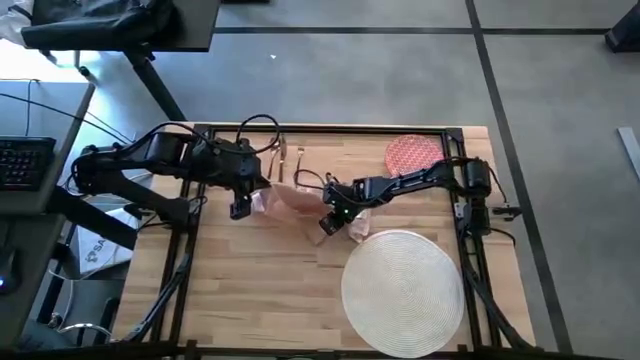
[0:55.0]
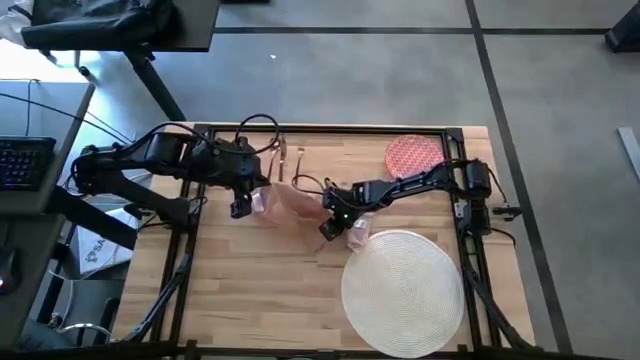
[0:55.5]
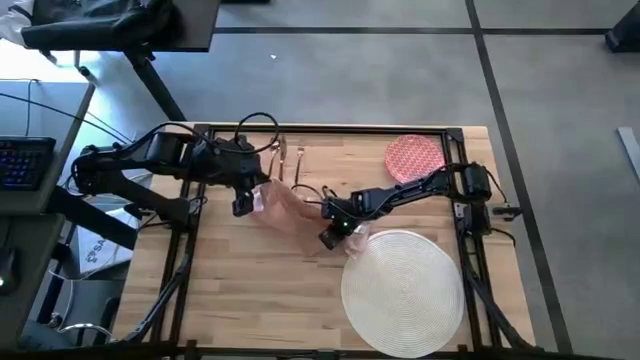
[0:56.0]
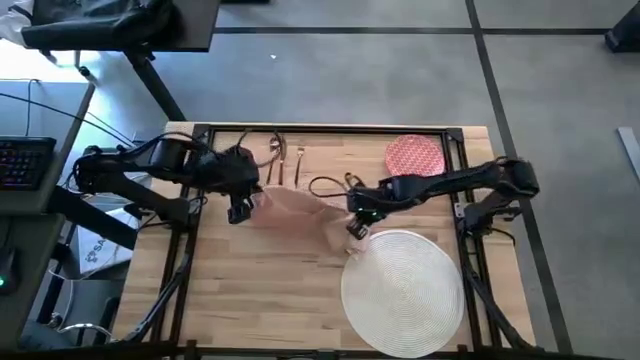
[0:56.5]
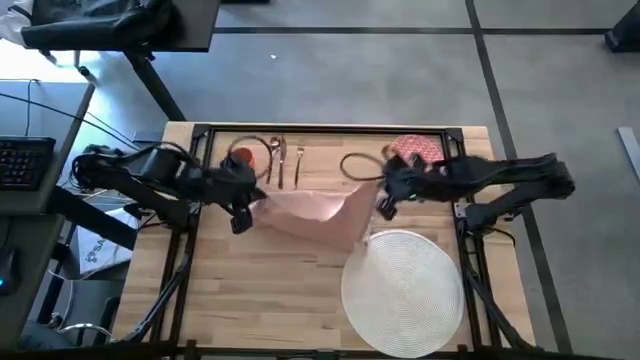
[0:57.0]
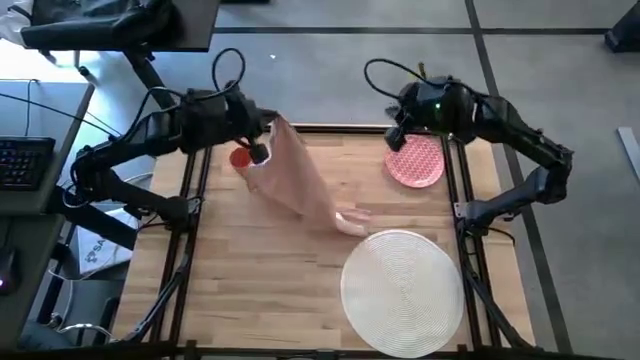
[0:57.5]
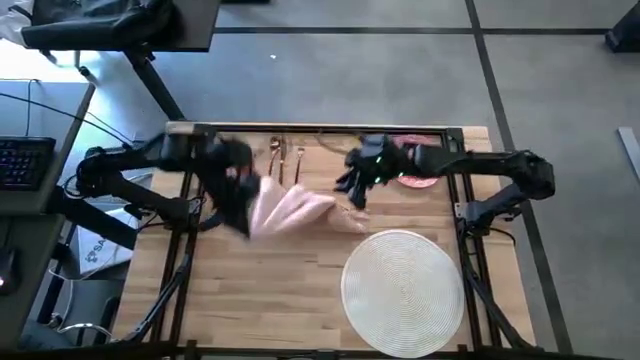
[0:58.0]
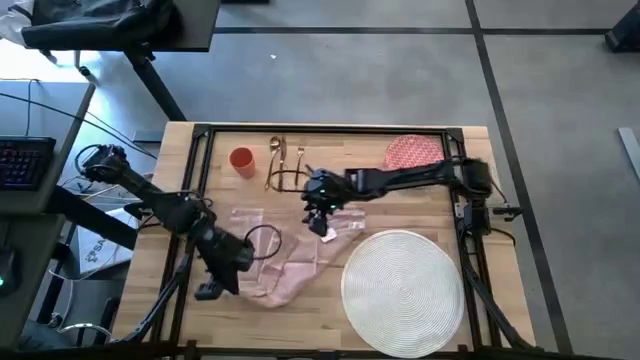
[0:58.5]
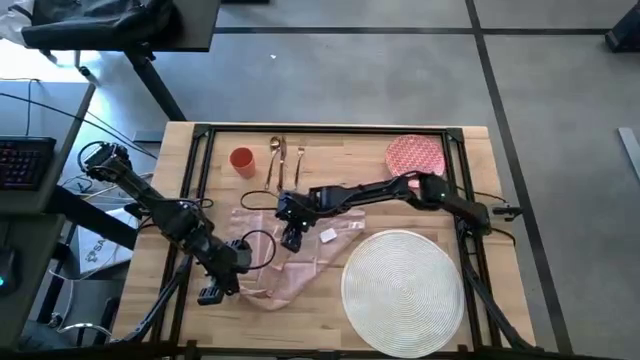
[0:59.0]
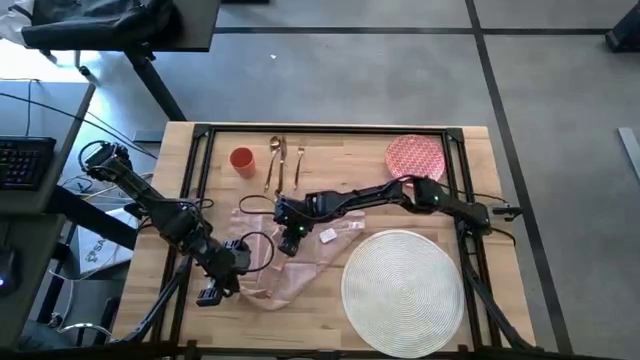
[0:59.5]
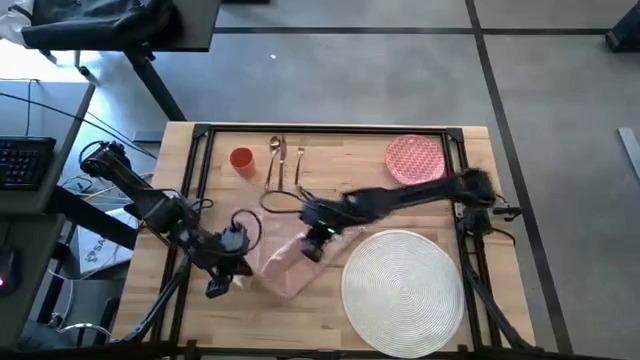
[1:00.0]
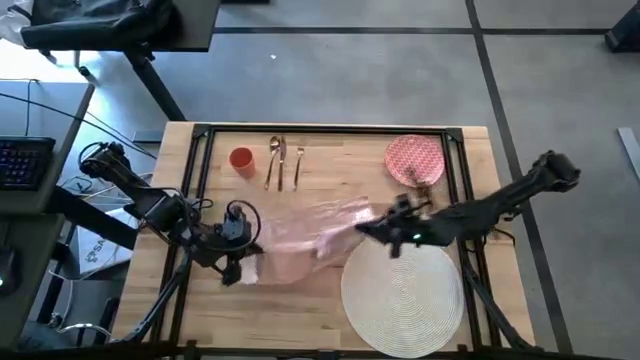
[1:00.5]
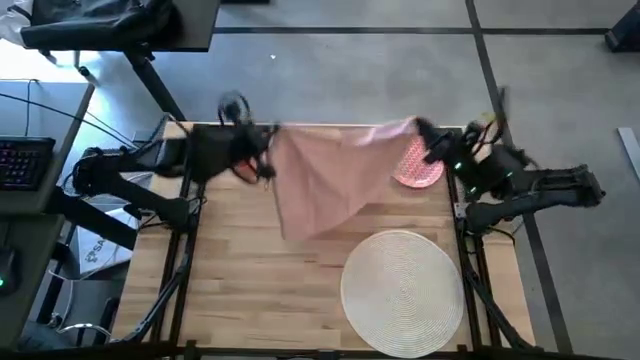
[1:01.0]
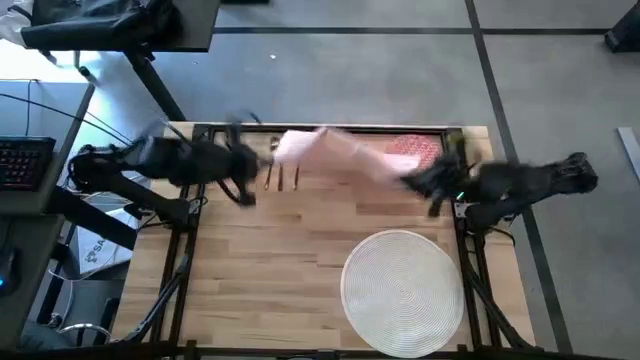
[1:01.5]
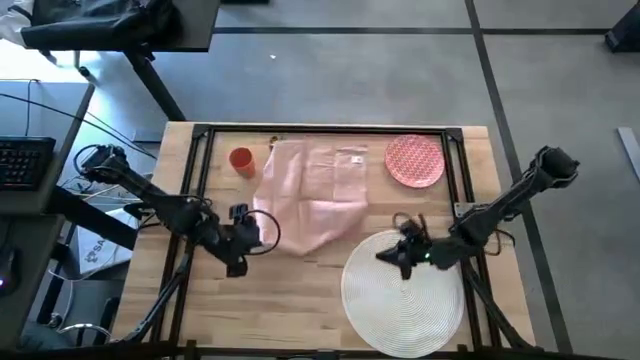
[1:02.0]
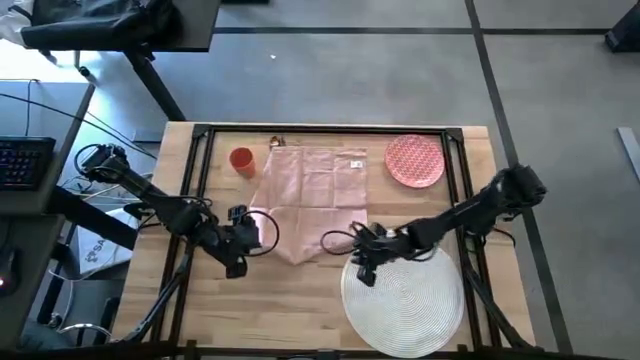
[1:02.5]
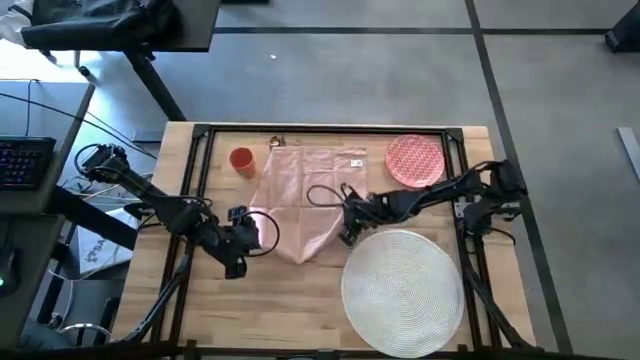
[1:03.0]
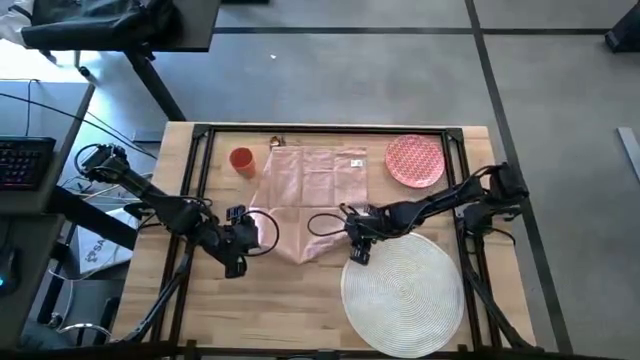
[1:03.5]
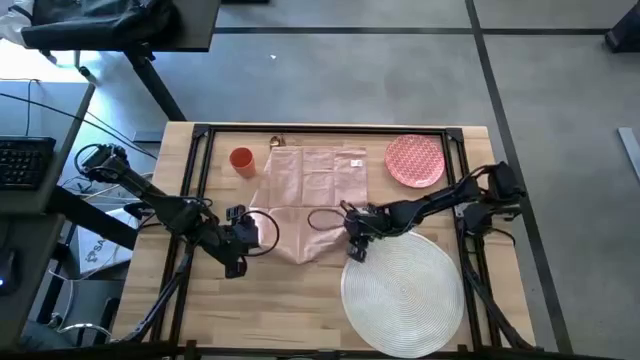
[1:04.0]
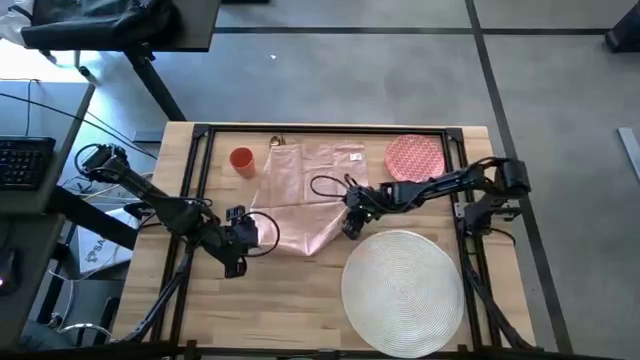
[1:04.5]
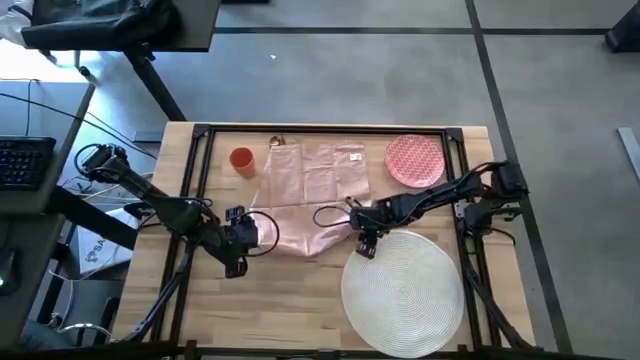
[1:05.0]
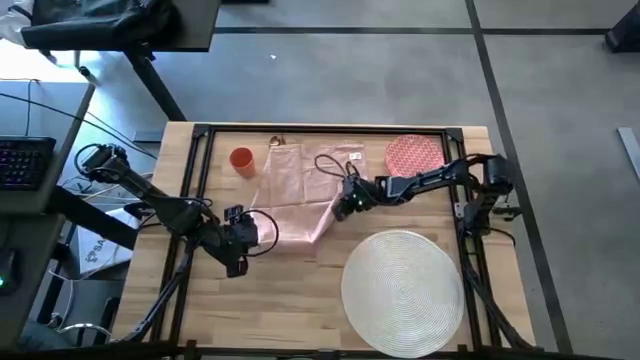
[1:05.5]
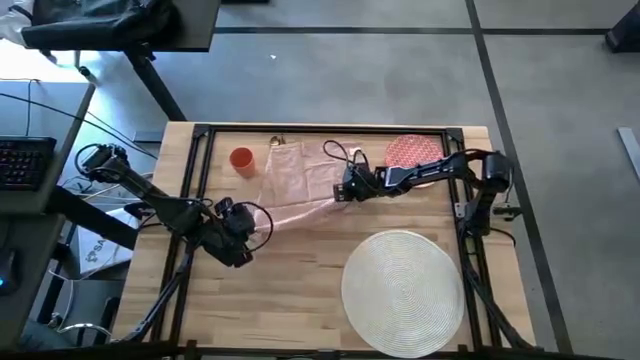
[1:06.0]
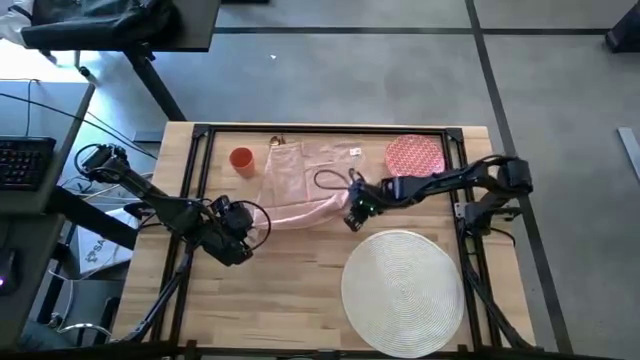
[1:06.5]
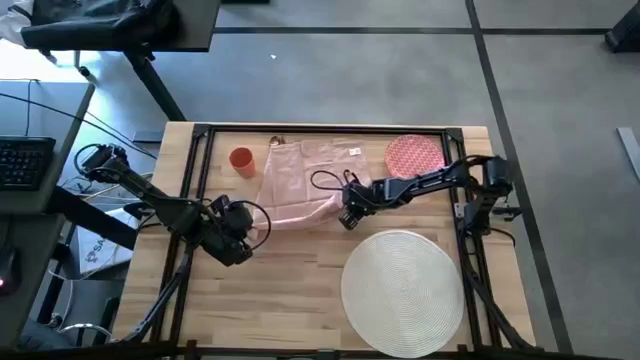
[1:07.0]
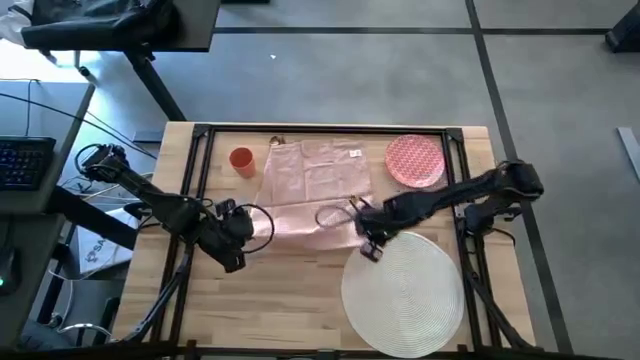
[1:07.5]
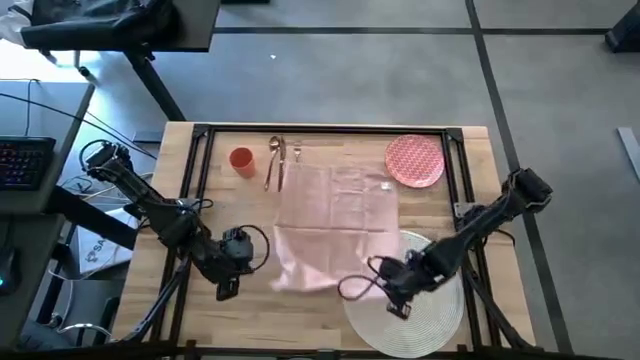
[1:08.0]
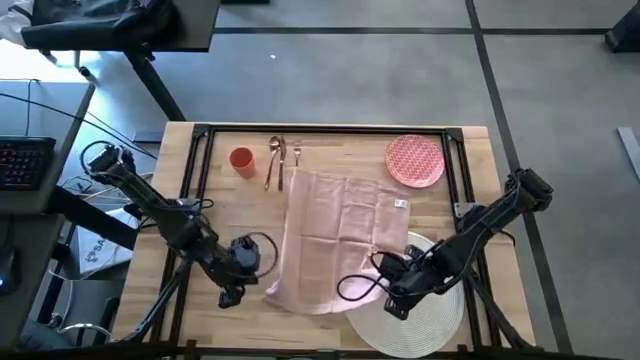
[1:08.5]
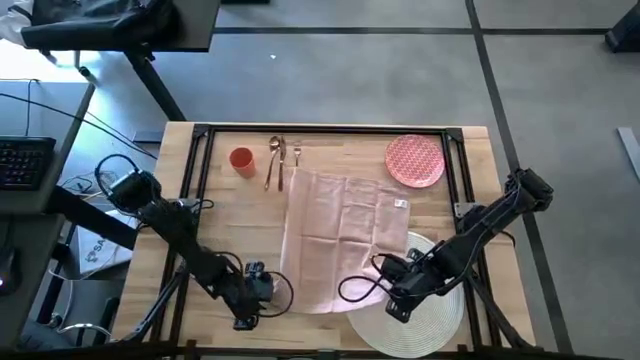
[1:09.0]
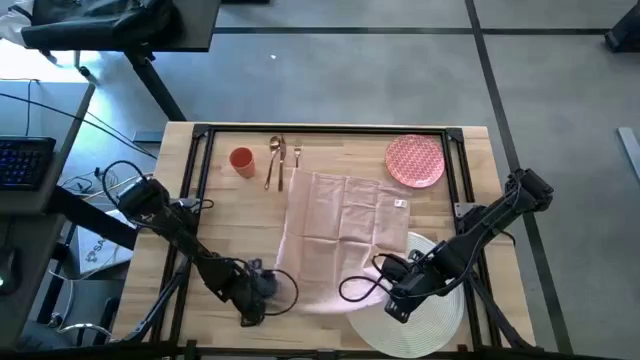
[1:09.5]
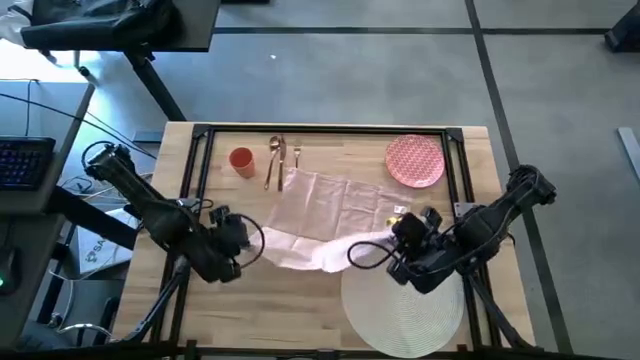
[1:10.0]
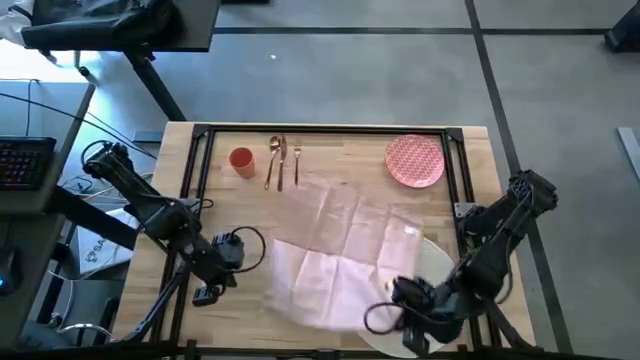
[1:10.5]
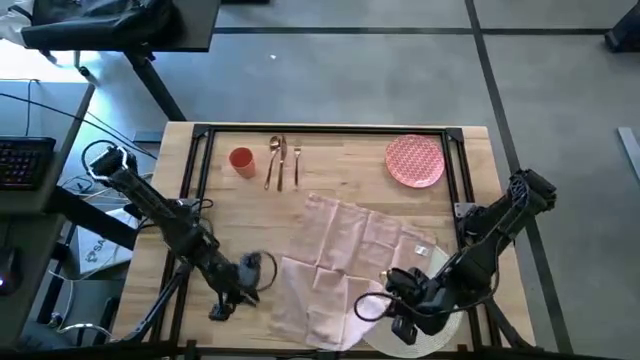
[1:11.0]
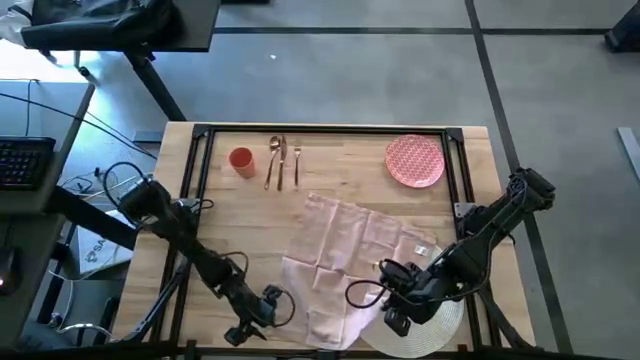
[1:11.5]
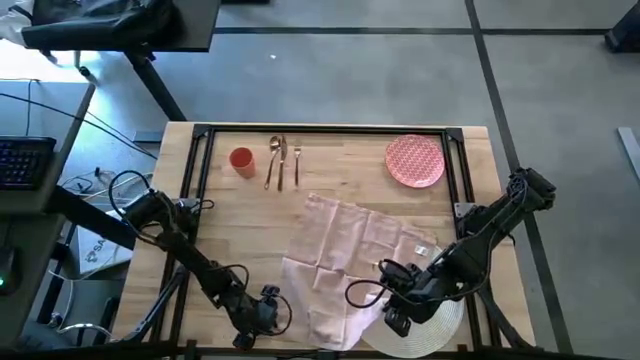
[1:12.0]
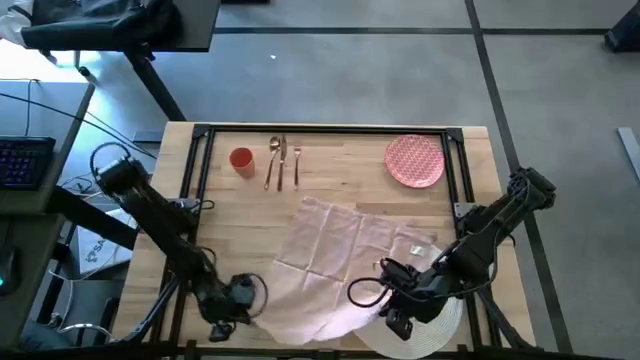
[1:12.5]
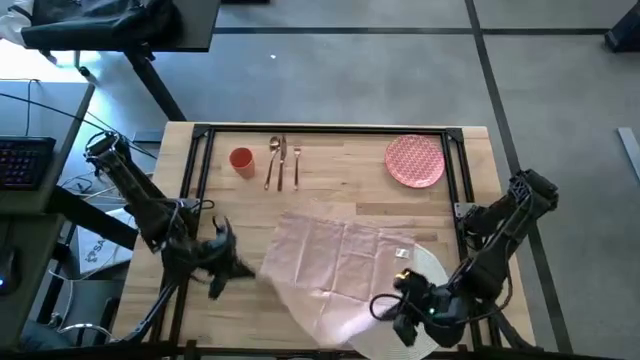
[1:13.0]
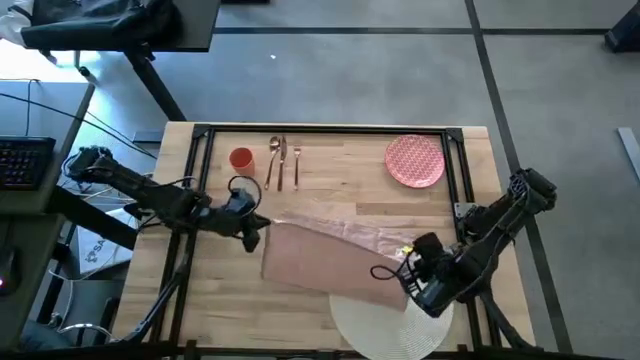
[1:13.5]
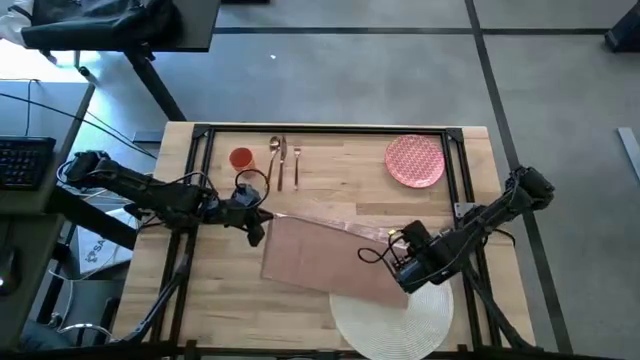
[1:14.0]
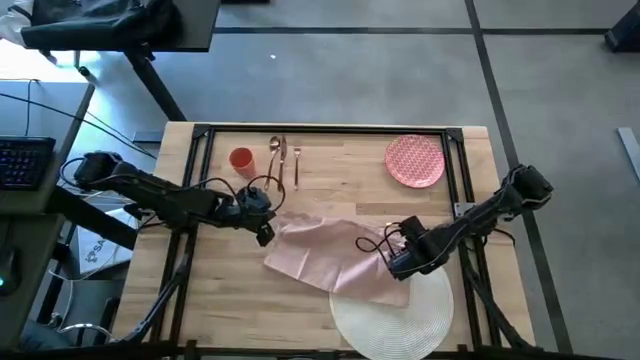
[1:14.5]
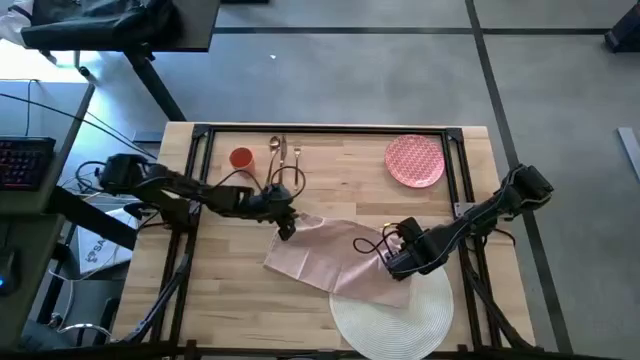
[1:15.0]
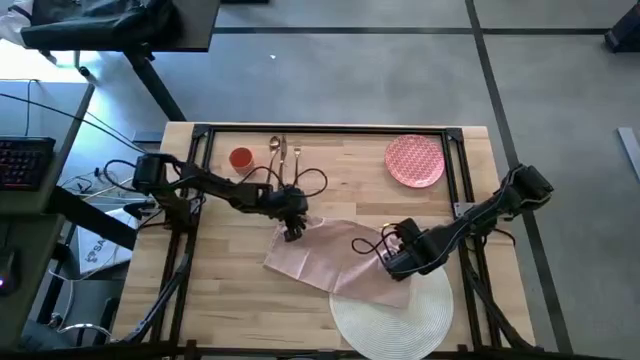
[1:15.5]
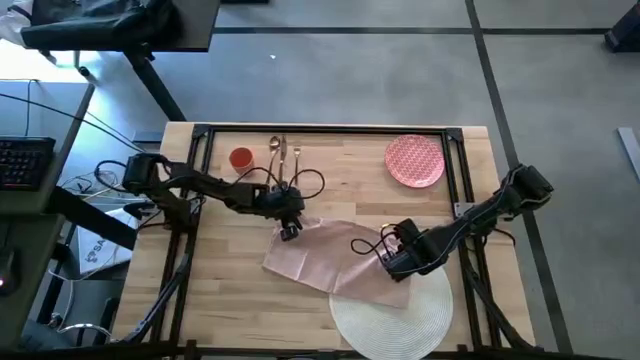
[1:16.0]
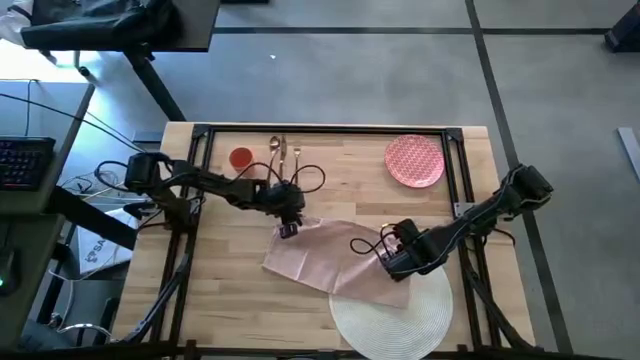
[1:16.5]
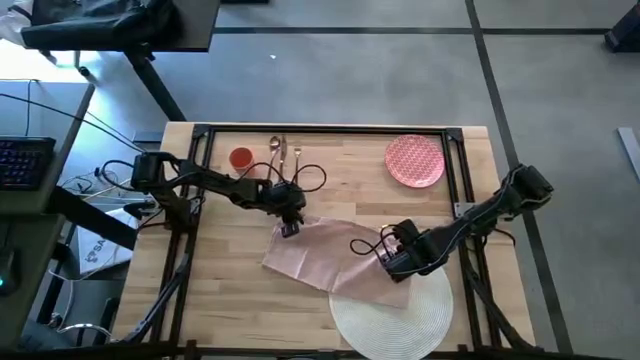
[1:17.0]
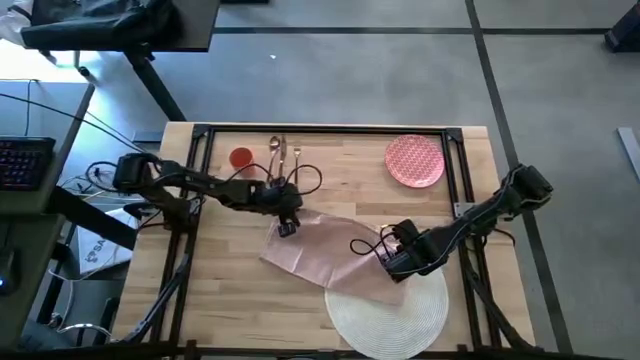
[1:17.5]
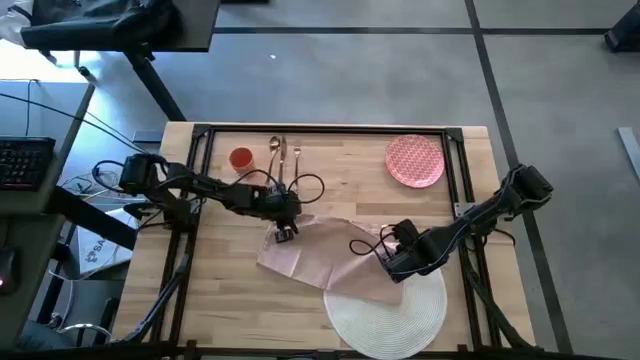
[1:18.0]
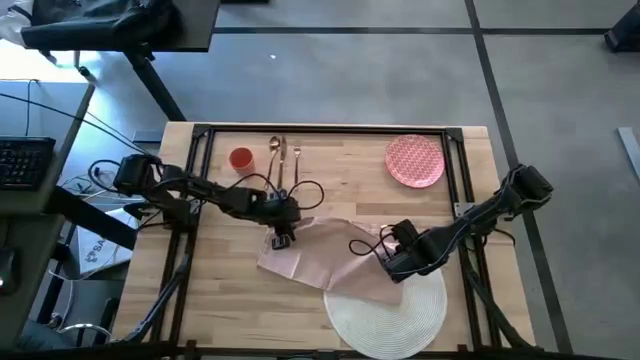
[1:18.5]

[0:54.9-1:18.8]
Task: Set table place
Fold pink table napkin
